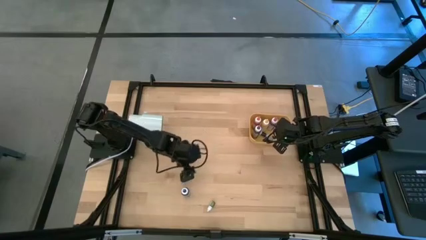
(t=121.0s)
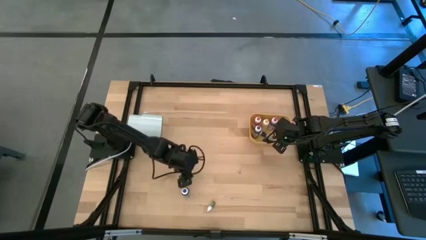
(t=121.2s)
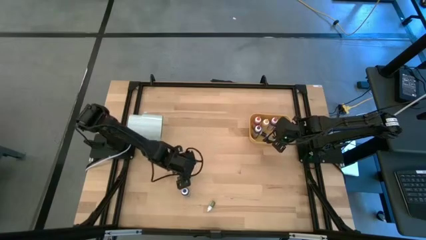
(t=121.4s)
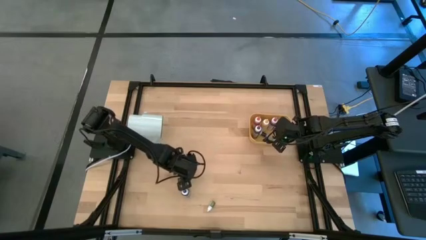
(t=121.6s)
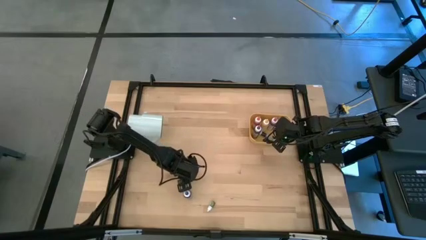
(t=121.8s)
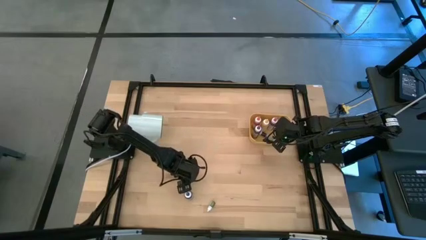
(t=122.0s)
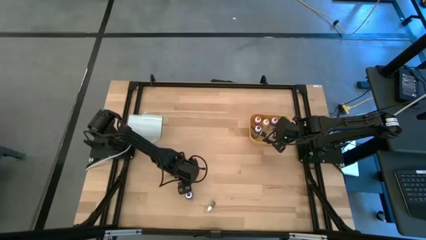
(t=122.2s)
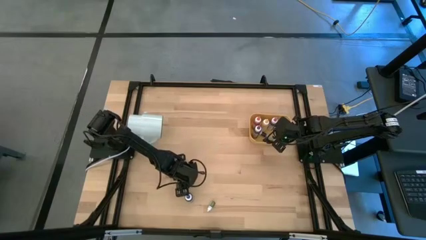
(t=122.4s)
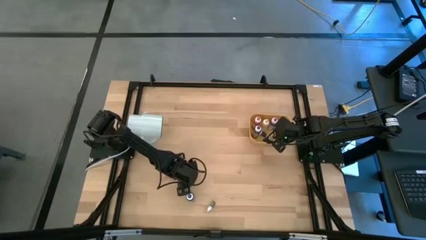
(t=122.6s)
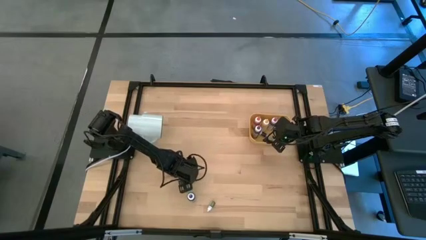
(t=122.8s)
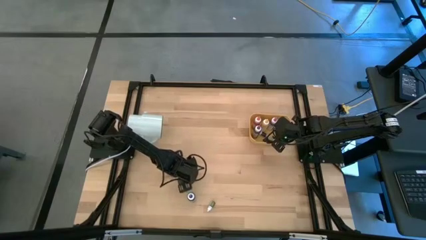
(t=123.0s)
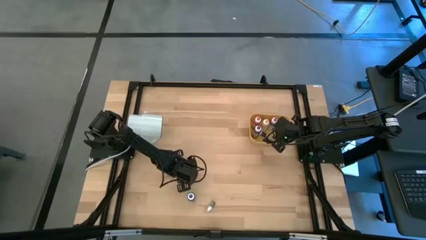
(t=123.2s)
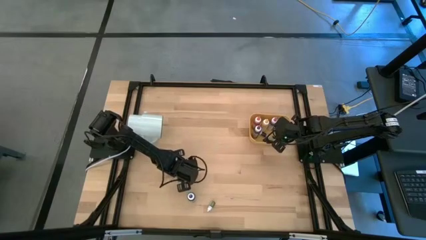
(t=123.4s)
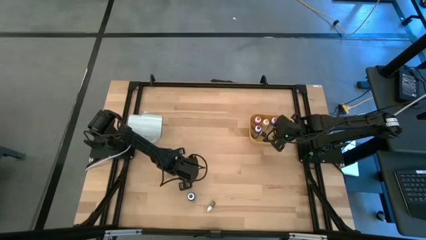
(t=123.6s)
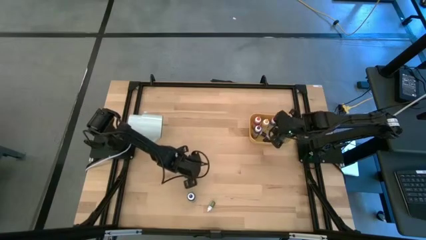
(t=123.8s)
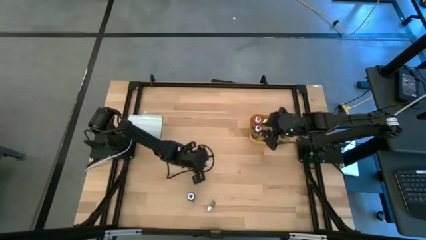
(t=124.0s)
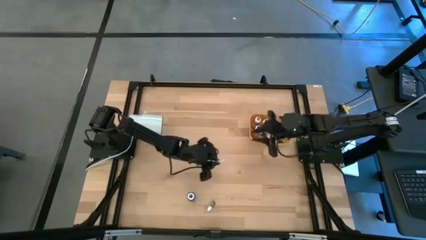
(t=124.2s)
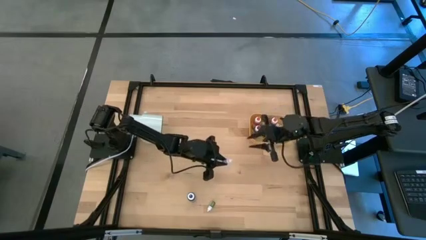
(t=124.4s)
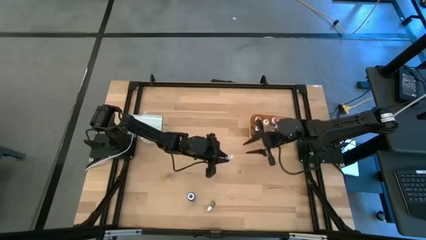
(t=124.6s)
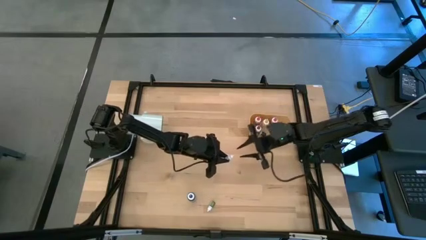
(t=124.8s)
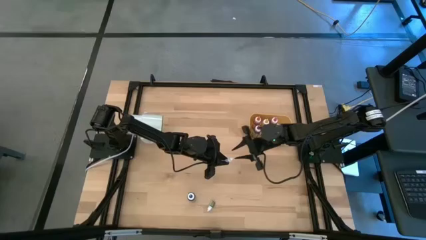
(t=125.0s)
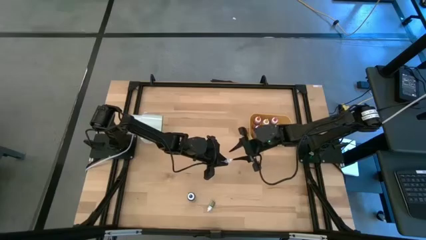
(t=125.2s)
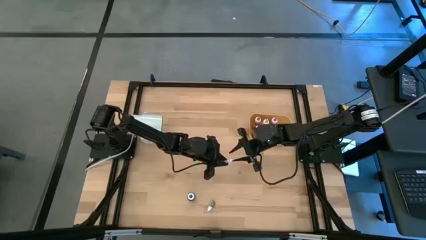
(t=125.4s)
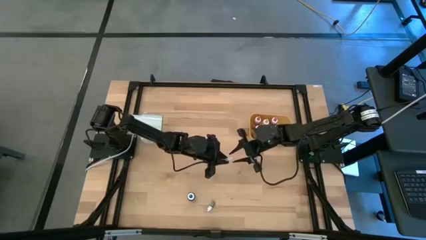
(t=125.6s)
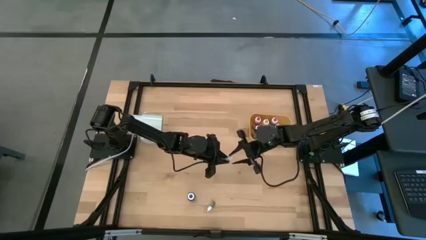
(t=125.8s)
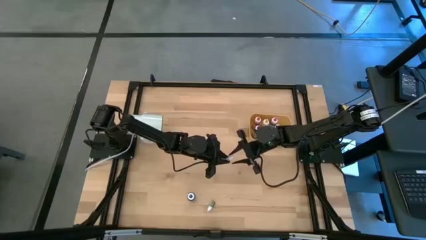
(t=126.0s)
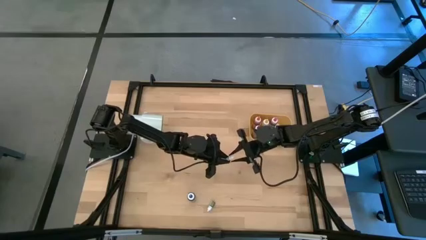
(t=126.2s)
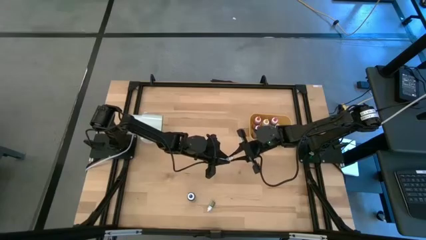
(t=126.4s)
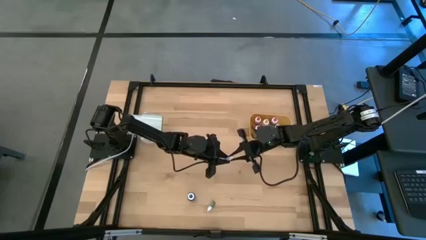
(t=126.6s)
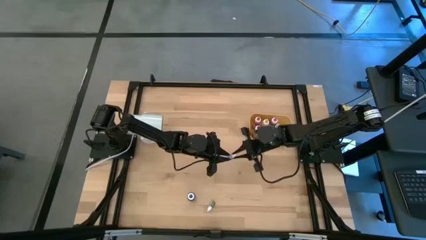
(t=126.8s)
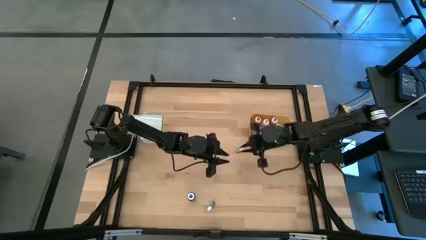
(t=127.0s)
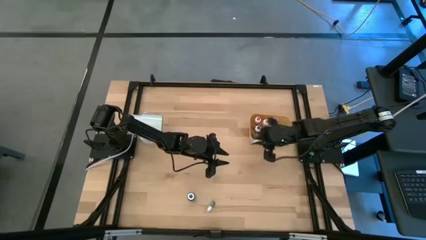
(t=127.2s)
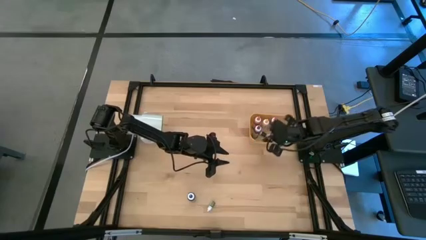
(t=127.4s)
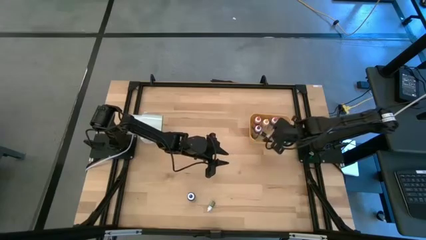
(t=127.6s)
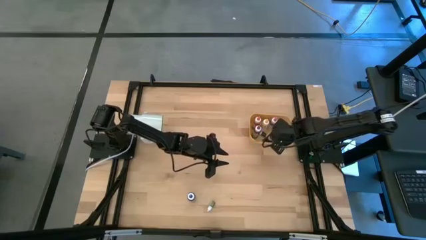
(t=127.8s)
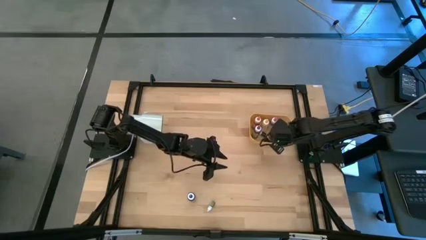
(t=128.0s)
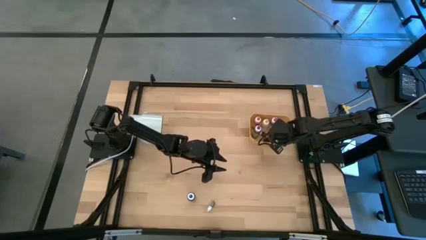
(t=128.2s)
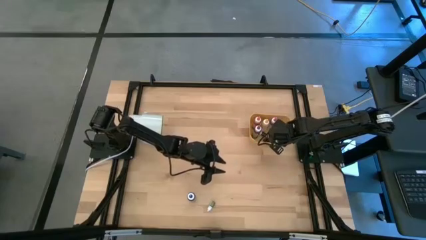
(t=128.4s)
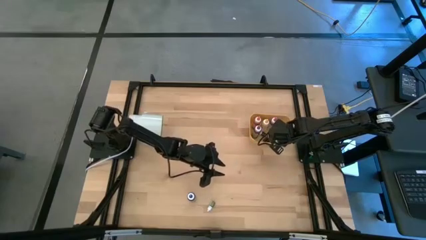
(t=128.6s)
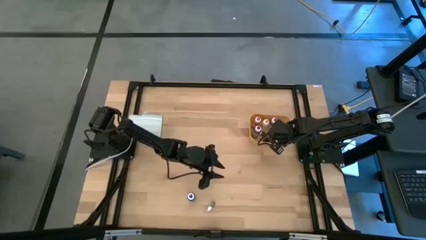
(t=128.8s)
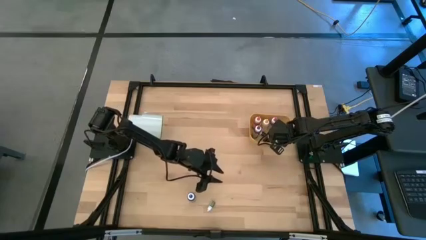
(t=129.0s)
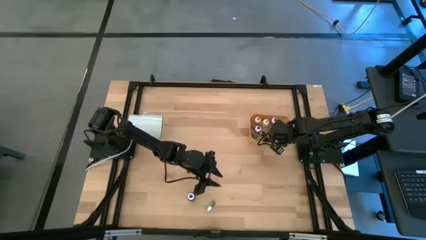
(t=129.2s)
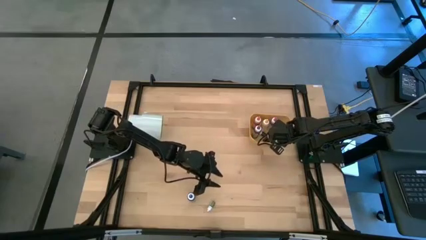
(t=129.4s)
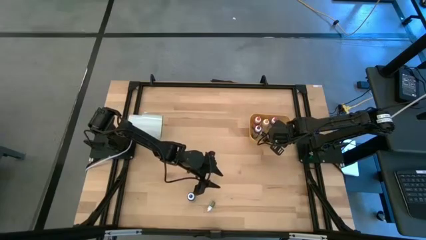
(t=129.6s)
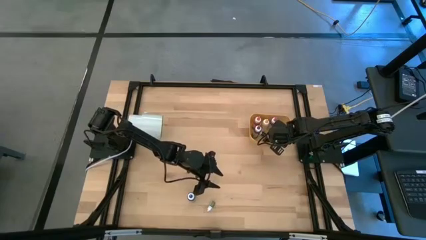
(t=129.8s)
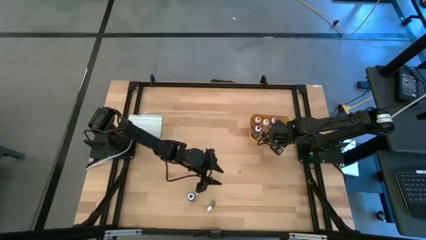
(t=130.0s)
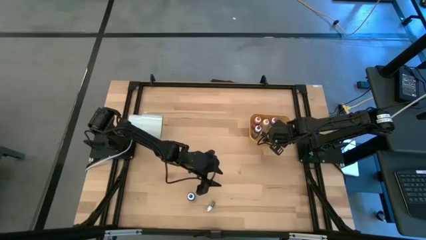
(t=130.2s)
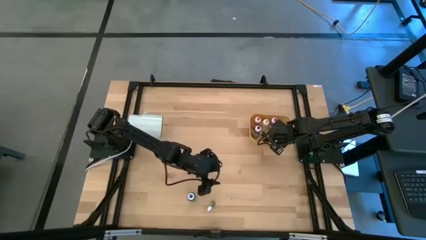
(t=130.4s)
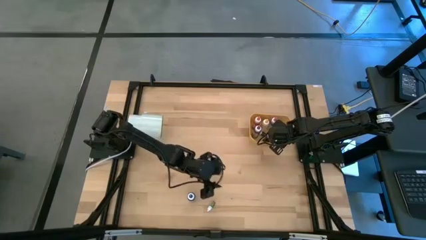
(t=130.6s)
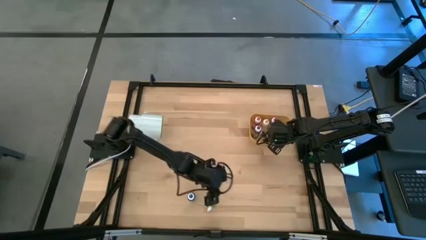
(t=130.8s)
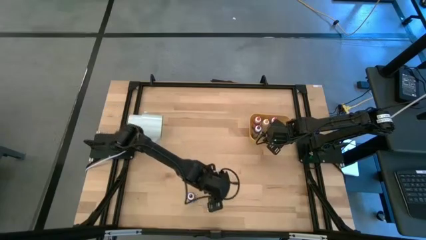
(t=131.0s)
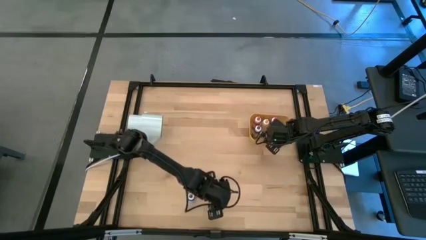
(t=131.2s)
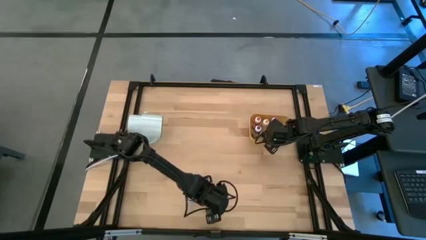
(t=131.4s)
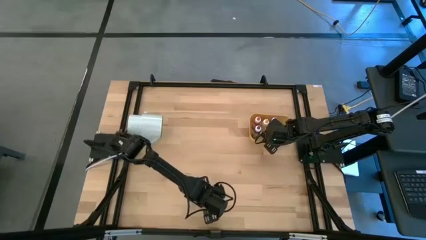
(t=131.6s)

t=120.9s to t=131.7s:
Task: Pick & Place food coloring
Put the blue food coloring bottle into the yellow bin

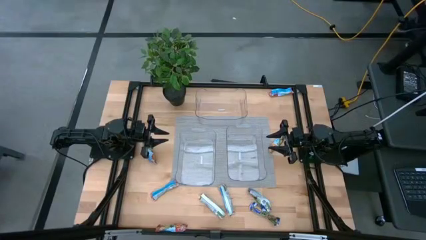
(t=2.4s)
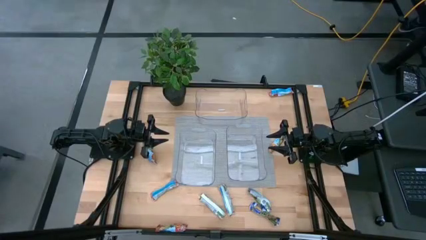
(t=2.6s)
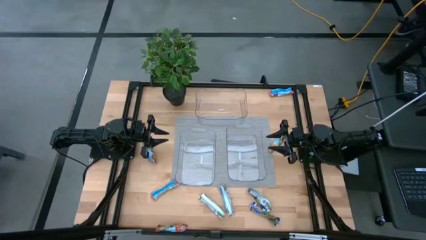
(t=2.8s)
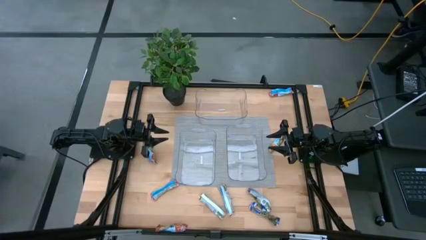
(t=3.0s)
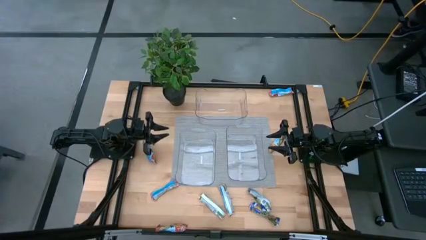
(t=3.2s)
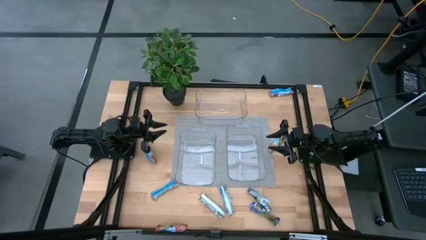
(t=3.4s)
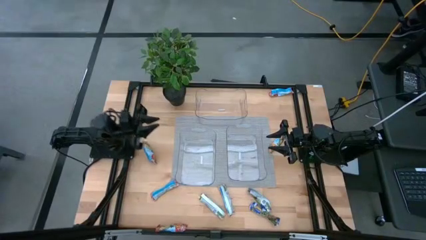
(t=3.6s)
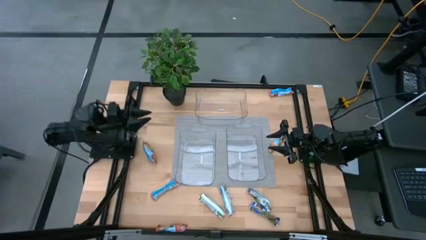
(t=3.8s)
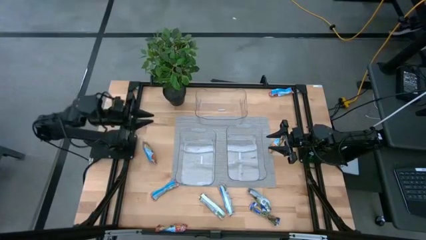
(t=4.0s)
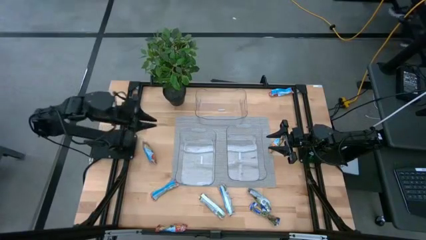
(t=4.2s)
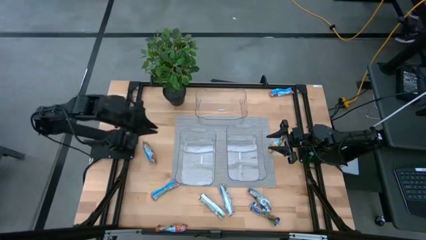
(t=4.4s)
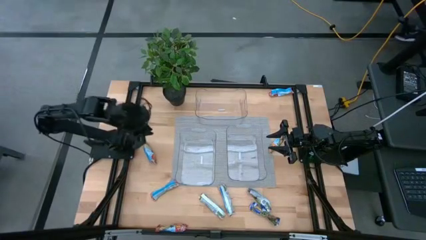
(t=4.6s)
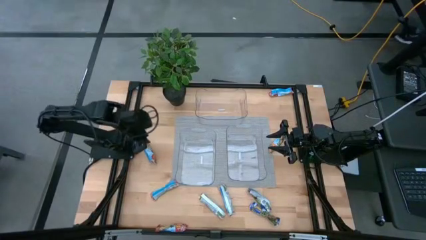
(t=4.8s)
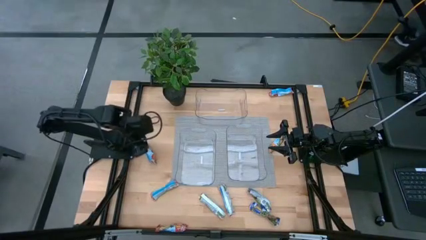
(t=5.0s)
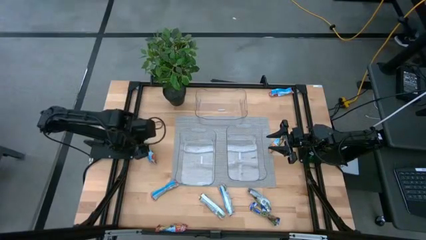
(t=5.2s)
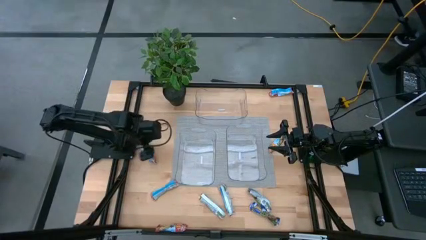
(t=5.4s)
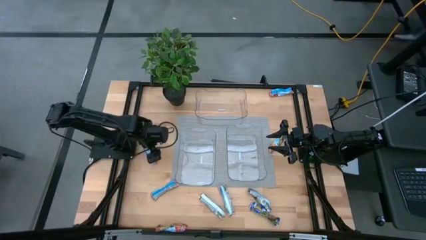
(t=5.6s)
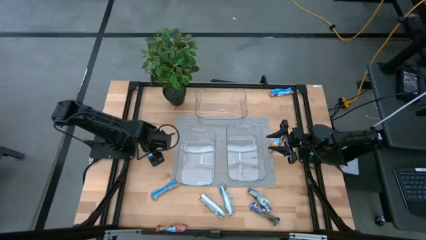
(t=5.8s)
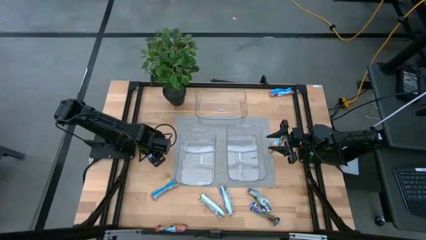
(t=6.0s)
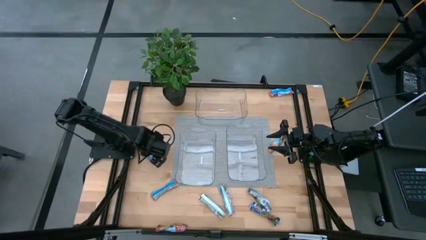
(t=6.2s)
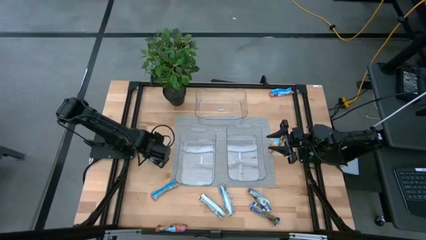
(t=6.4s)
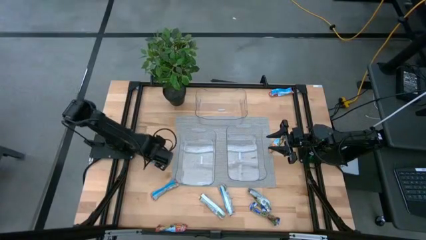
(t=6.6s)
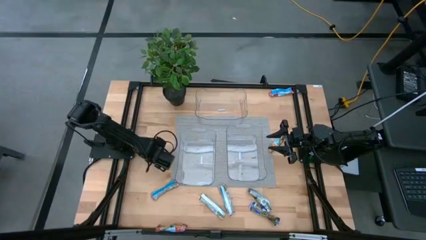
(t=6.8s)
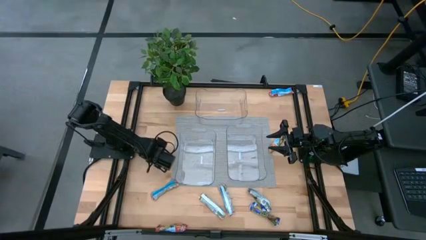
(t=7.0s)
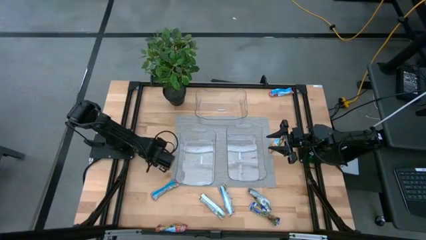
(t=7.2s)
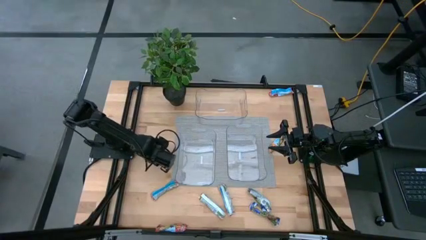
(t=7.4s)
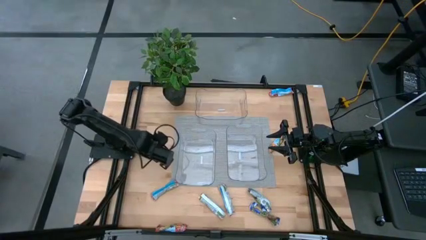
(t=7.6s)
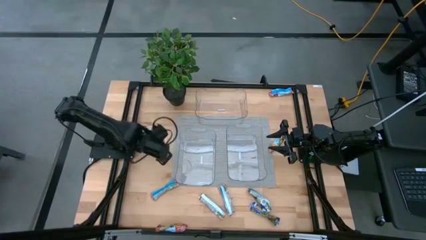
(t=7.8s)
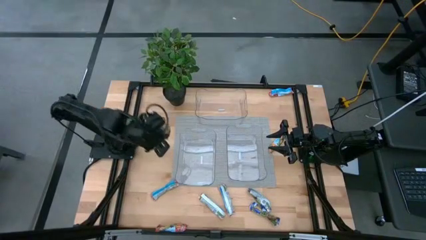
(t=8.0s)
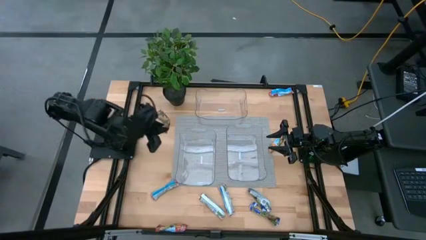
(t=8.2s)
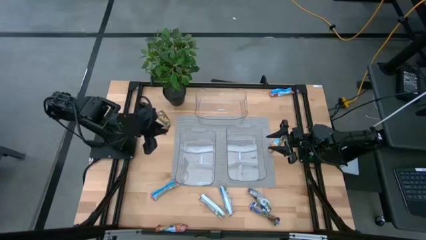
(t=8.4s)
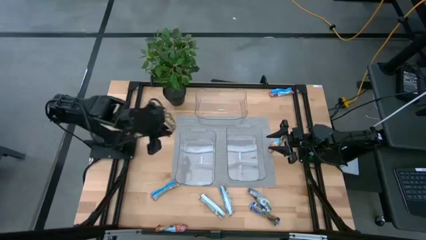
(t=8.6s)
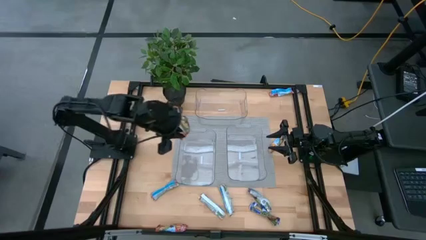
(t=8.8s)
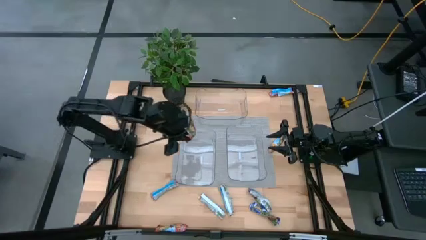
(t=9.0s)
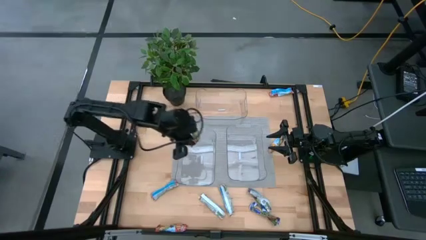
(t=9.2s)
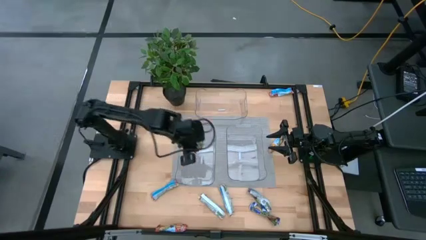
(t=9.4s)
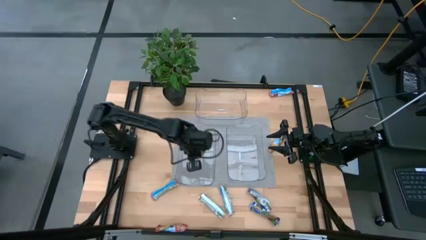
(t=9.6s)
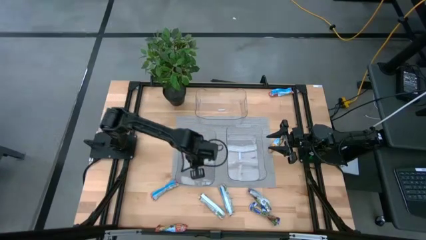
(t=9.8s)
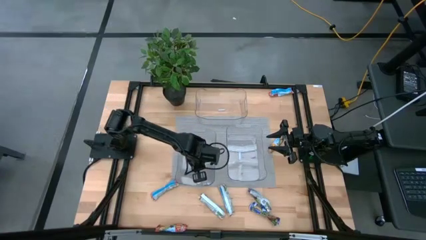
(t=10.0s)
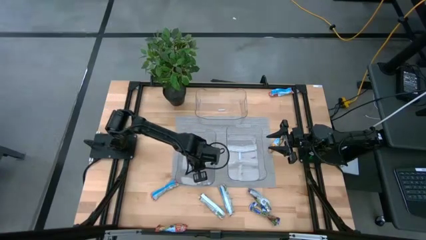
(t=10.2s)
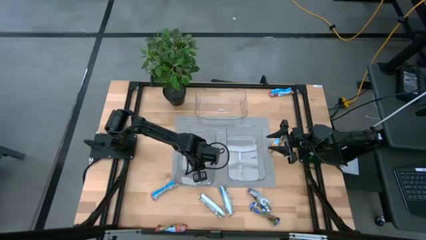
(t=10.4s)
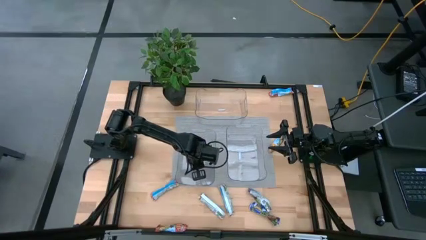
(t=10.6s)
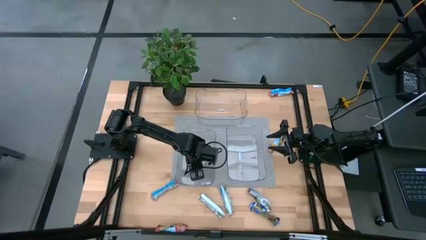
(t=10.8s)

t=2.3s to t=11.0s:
Task: Pick and place Granola Bars by type
Put the red granola bar into the bottom left transparent bin
